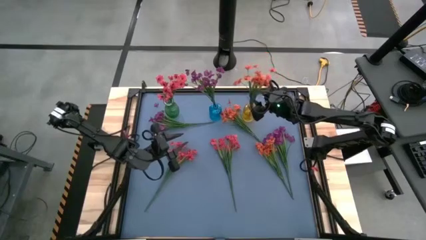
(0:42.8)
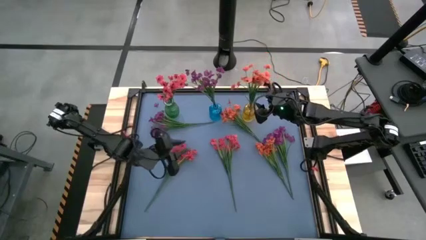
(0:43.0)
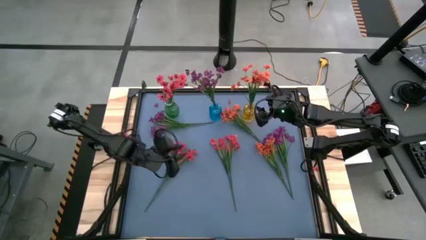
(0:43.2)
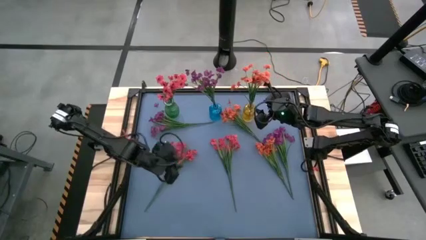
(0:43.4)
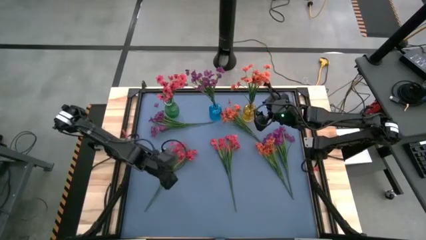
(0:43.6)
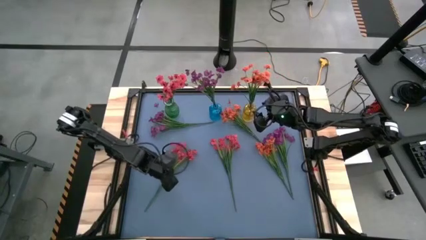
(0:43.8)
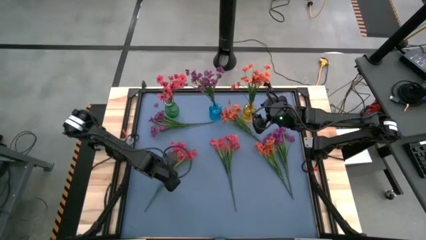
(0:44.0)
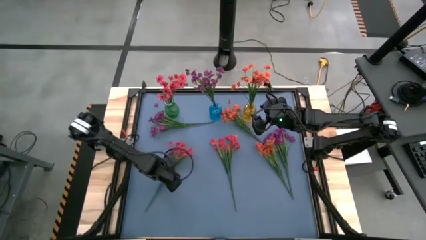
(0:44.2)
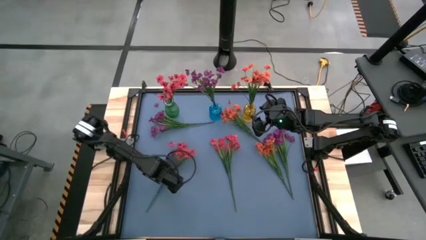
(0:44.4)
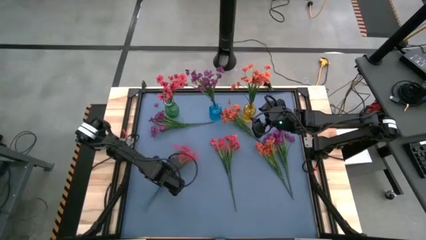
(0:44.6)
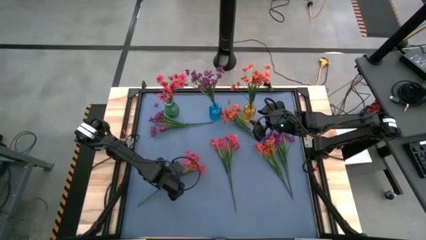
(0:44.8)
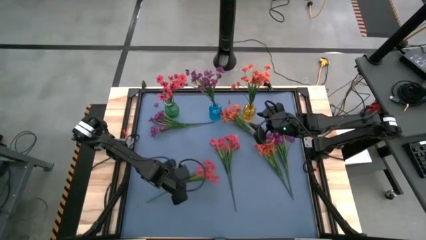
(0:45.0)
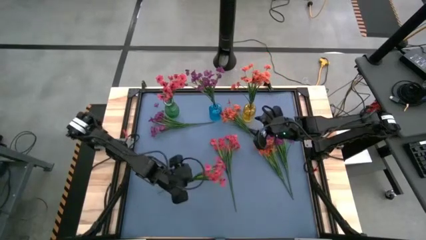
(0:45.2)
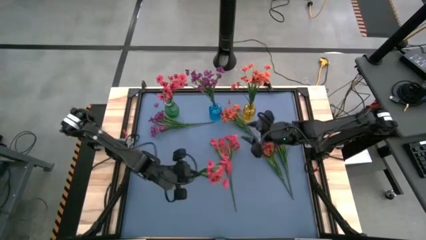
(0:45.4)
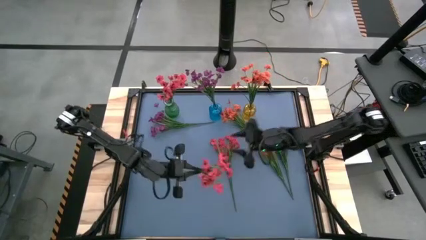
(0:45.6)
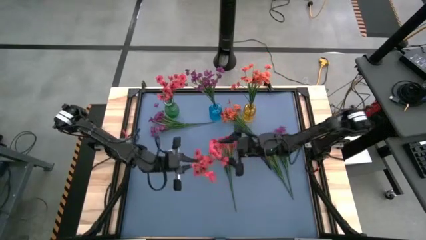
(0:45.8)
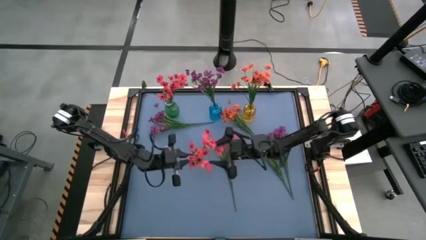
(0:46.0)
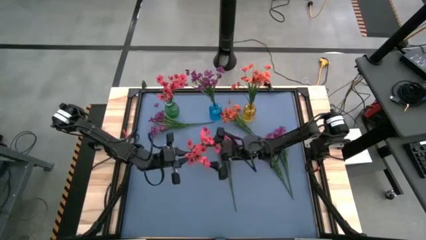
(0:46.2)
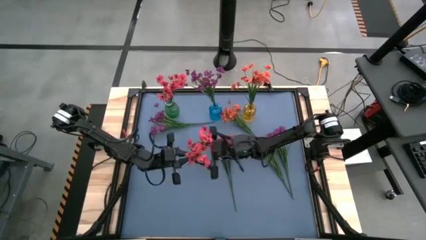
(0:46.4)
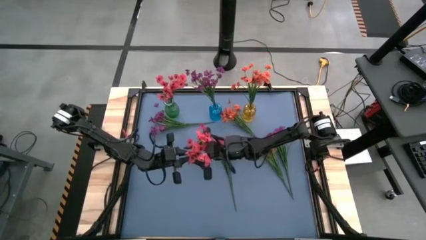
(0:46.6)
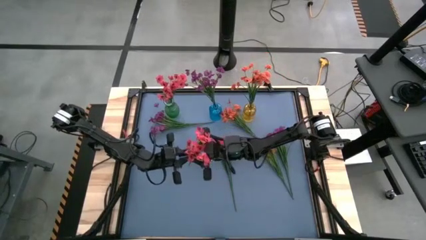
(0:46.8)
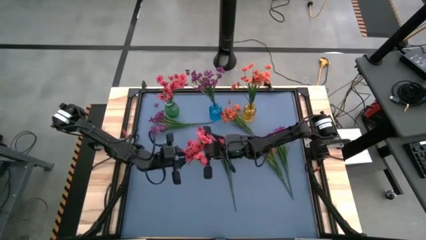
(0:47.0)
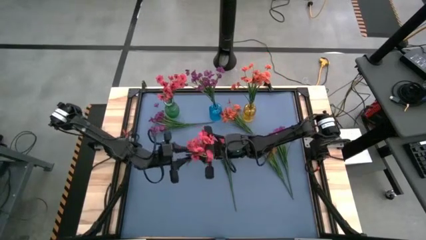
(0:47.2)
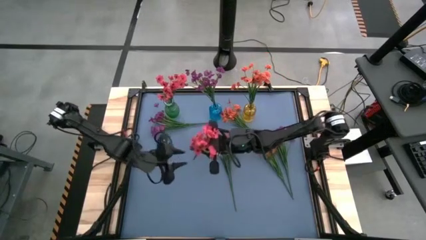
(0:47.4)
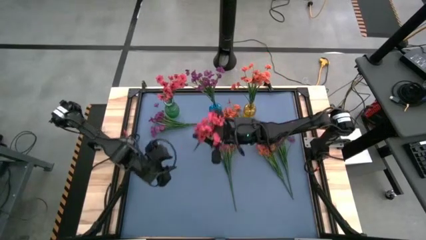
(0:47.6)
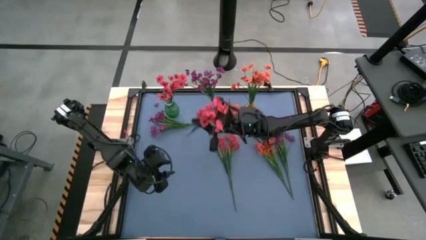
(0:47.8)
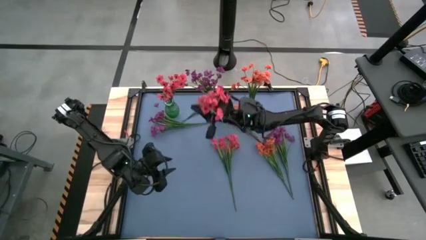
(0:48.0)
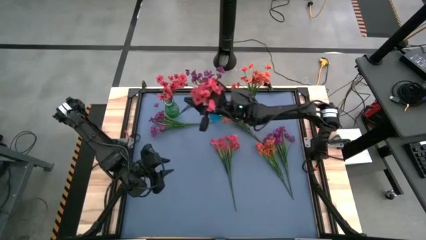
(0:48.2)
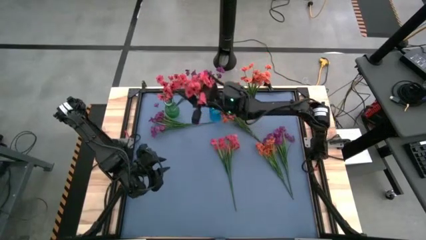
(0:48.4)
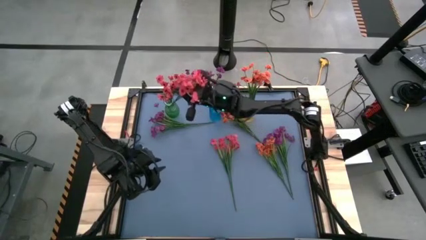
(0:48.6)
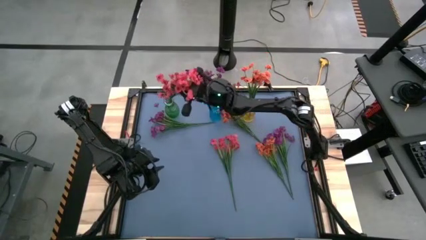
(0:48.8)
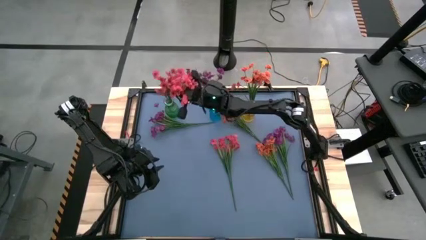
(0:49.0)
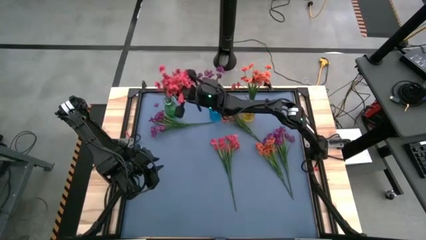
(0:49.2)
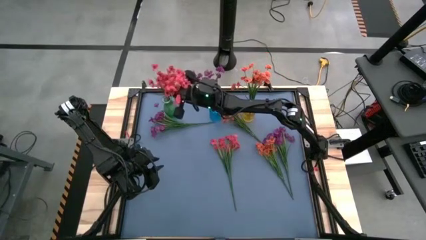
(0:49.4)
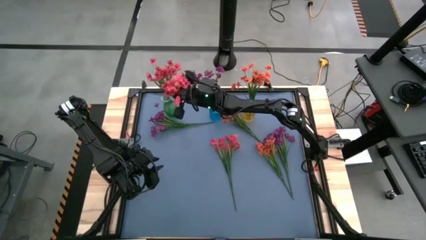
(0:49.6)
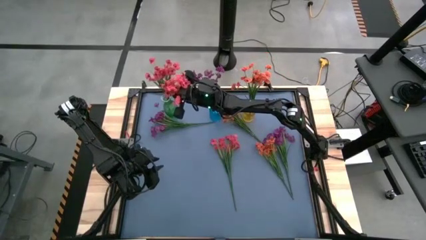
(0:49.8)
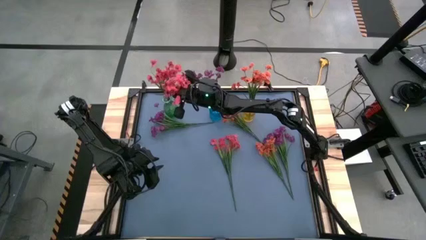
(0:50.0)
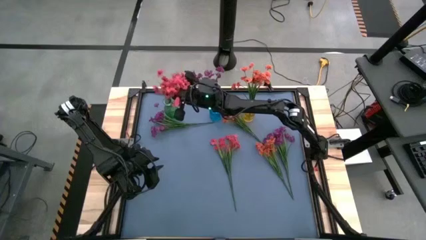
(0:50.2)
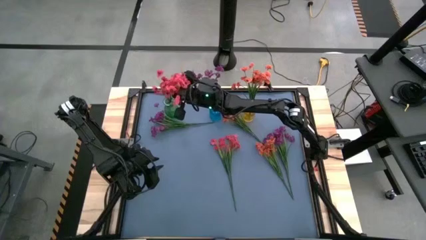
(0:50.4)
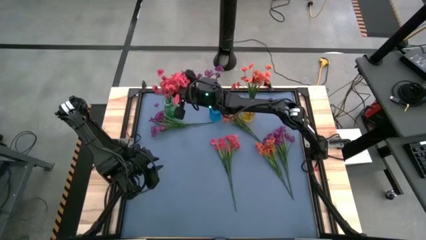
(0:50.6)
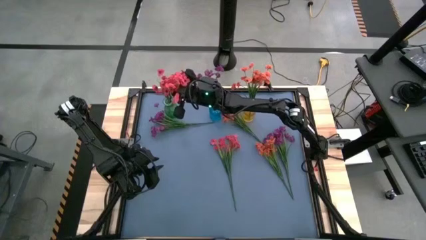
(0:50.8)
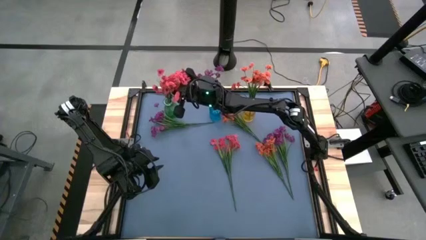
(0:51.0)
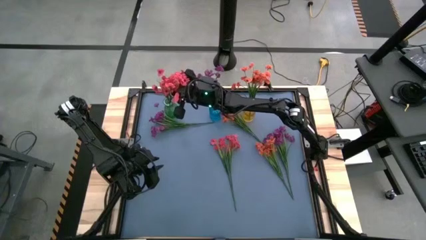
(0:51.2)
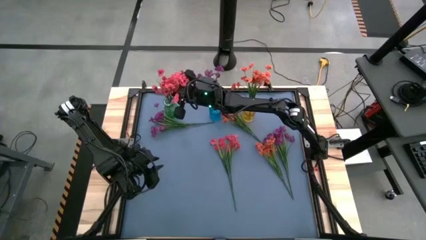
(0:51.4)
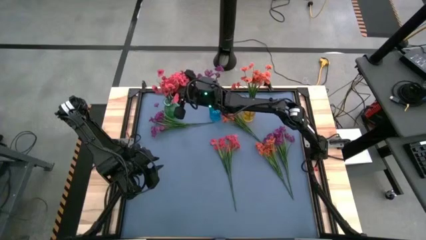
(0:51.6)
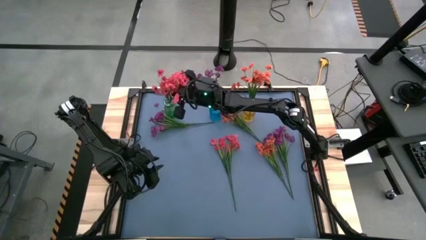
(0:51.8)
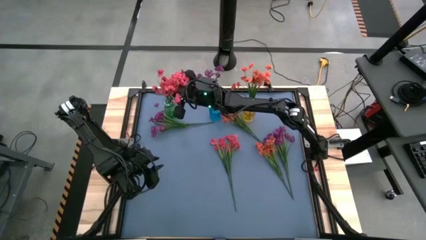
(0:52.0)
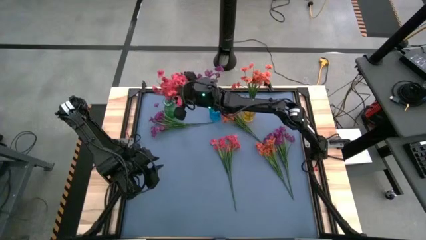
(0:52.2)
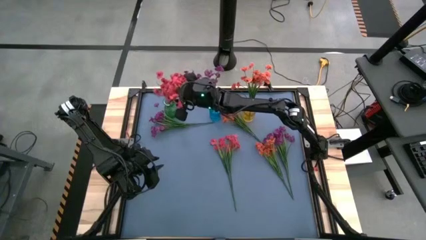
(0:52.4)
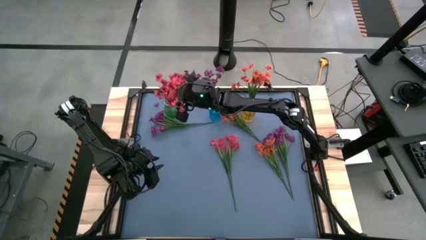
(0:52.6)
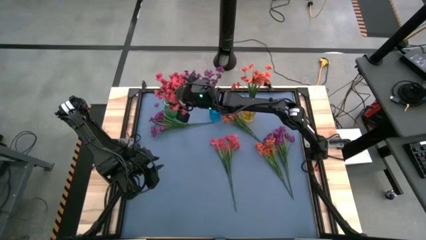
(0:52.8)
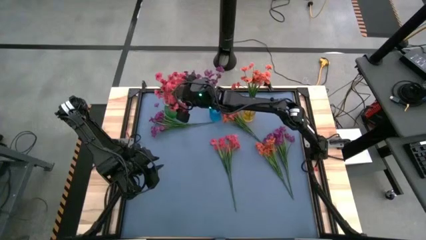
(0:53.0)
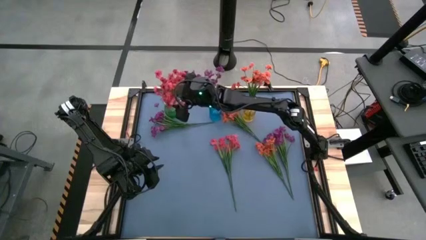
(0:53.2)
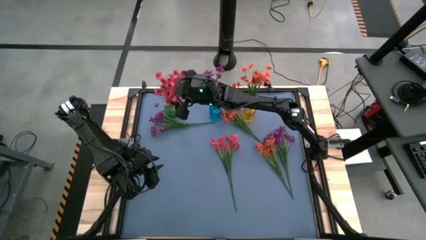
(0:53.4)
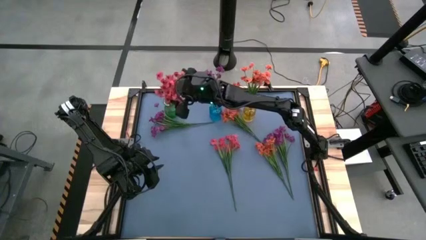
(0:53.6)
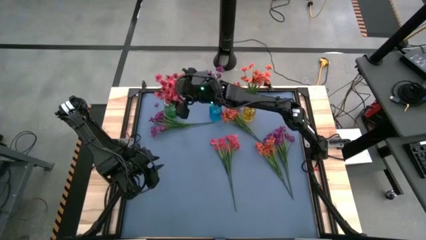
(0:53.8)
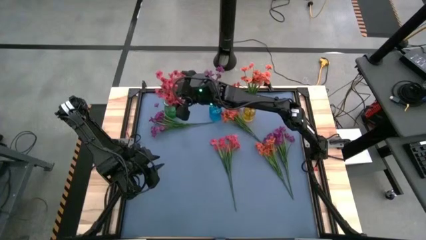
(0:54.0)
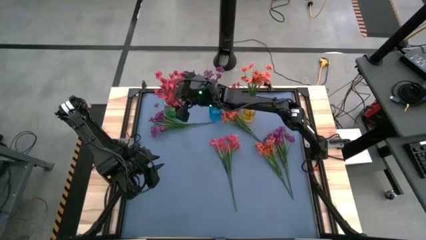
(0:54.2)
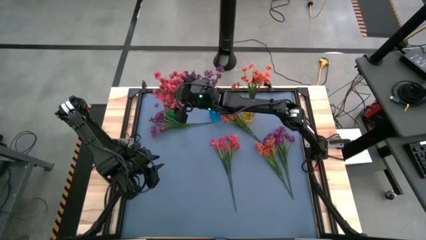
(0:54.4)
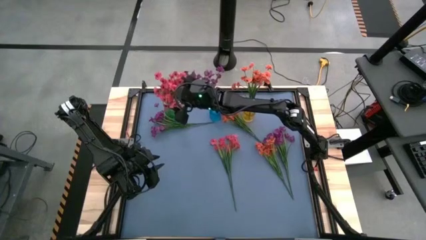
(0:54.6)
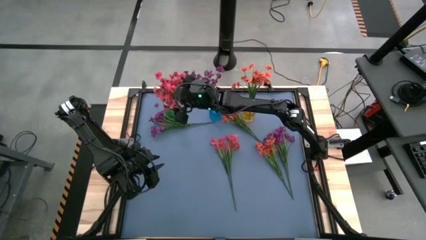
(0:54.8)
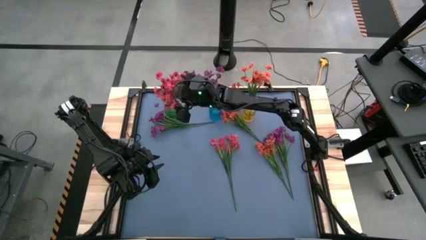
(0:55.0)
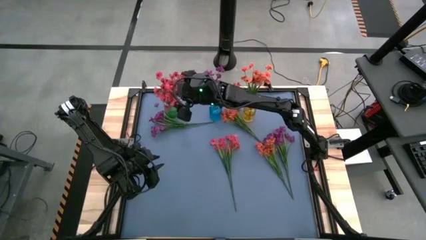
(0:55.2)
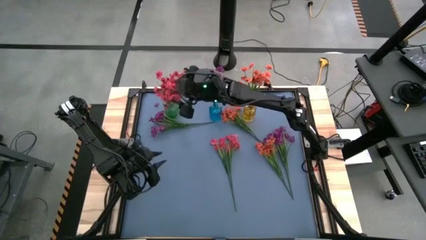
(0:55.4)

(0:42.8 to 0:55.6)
Task: Sort flowers into vase by color
Put the left pink flower into the green vase

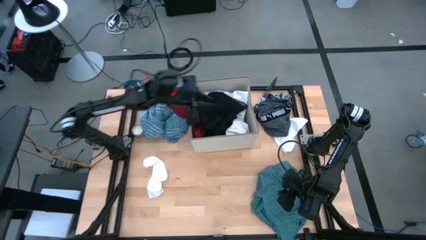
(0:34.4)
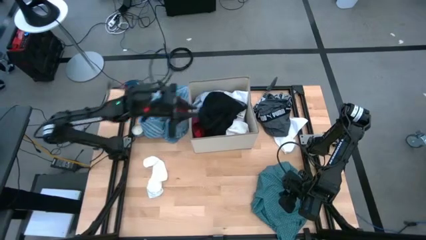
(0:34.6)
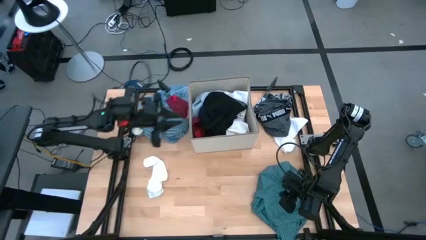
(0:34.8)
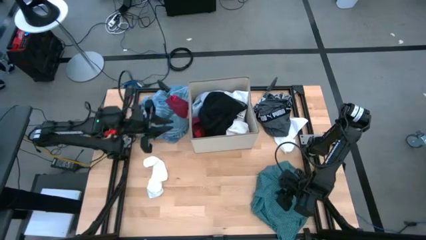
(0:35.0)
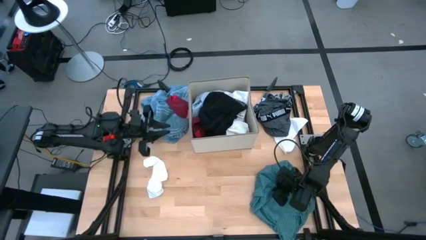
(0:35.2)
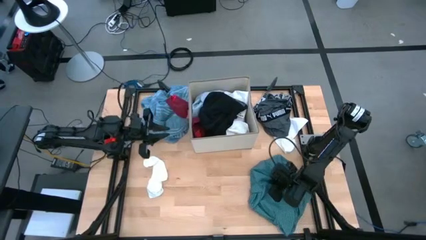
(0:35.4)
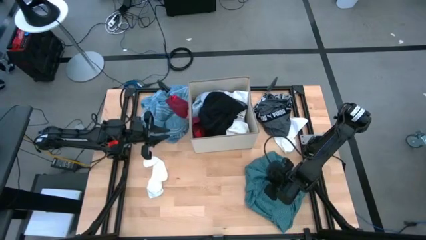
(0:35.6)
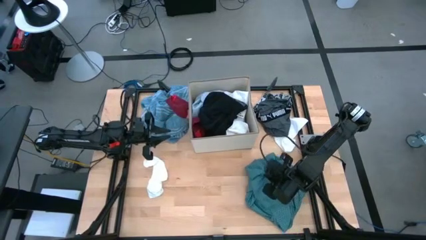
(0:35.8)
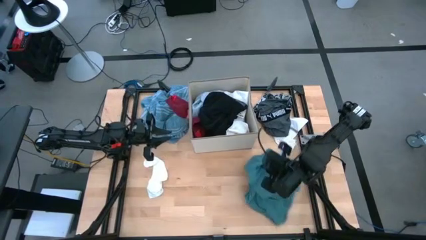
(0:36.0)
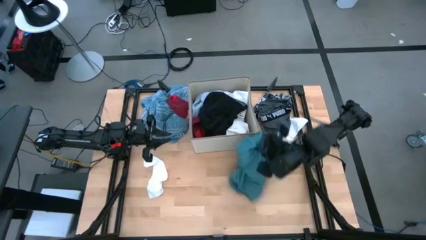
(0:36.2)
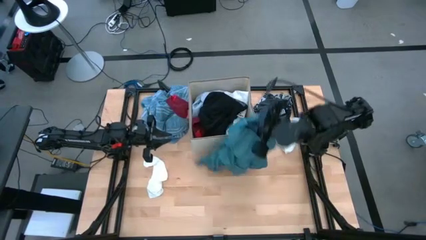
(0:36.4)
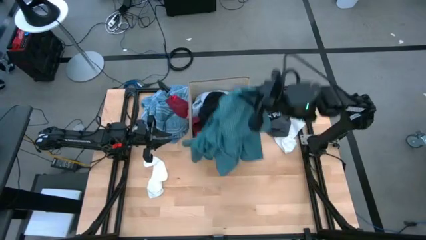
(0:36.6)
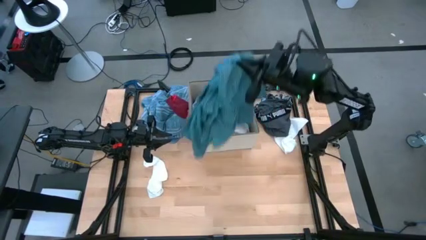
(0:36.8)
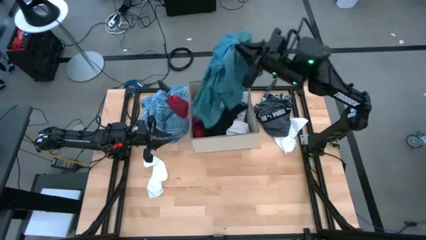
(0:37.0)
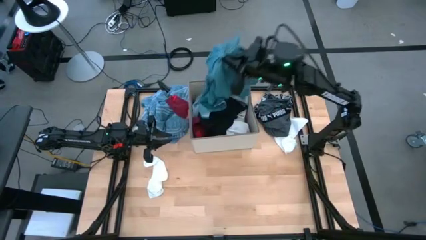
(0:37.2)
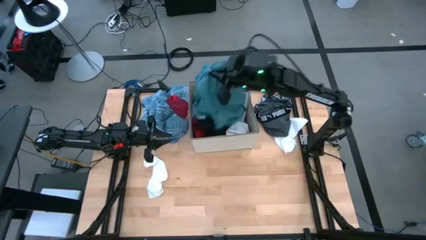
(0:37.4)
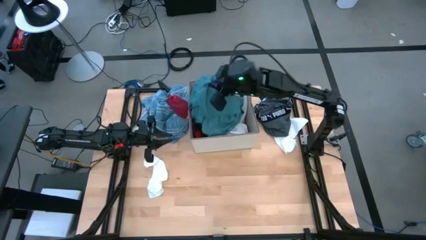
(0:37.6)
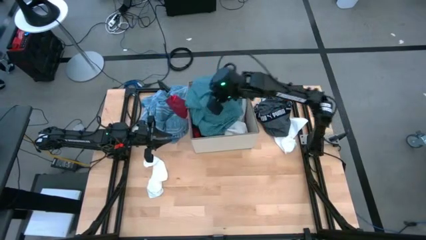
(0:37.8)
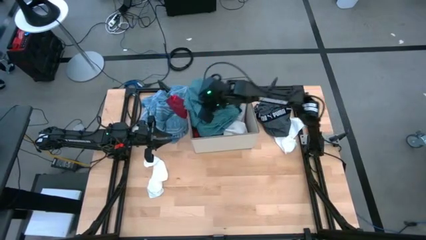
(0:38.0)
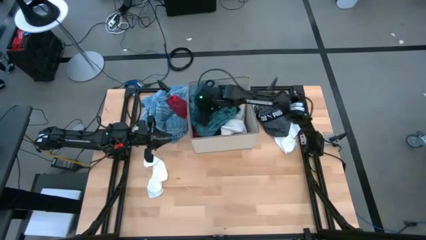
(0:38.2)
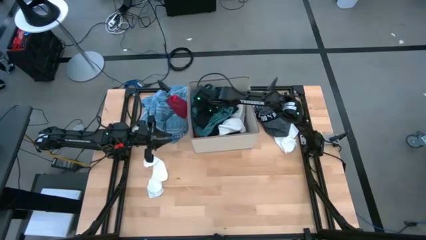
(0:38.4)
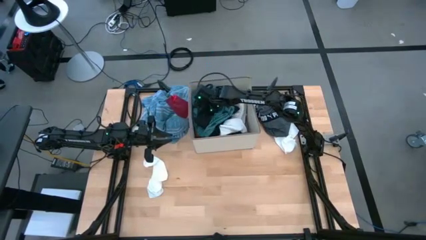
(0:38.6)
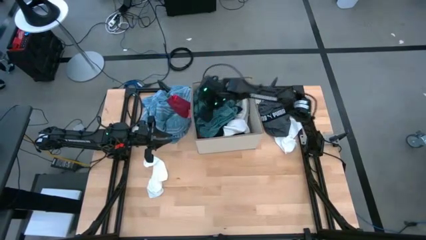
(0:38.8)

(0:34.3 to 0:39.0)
Task: Sort clothes
Put the green shirt into the bin
